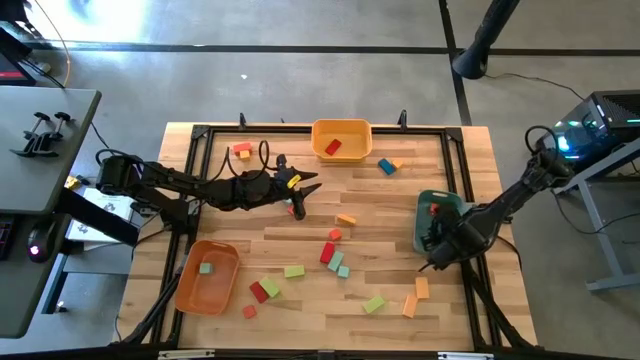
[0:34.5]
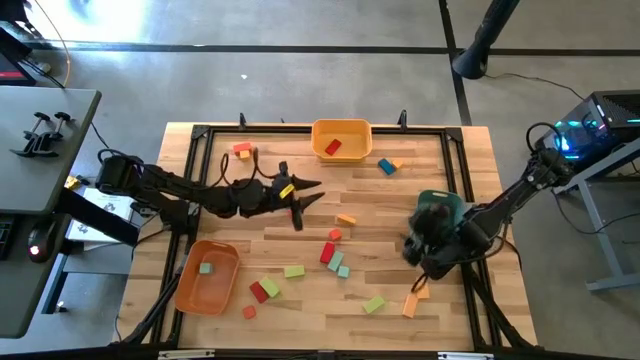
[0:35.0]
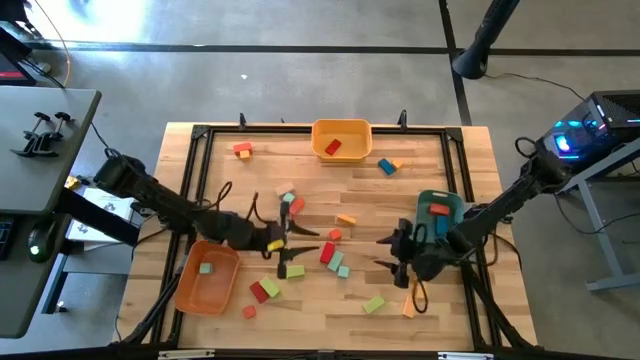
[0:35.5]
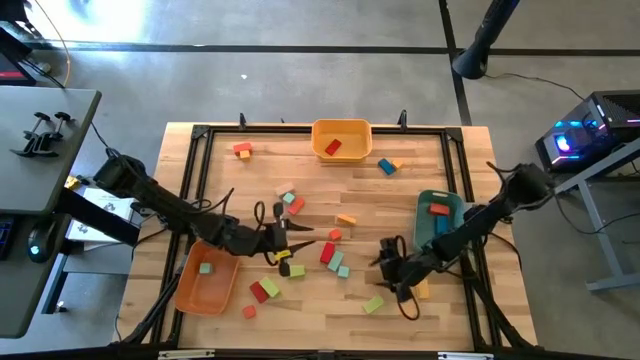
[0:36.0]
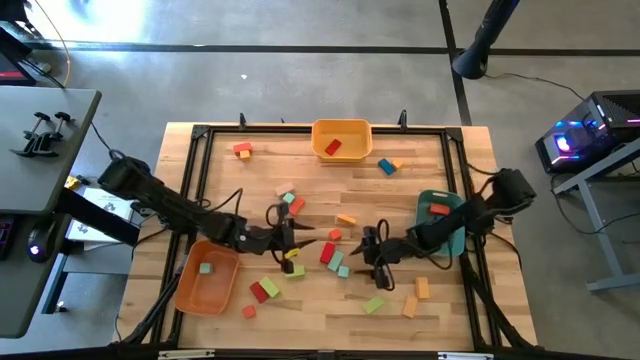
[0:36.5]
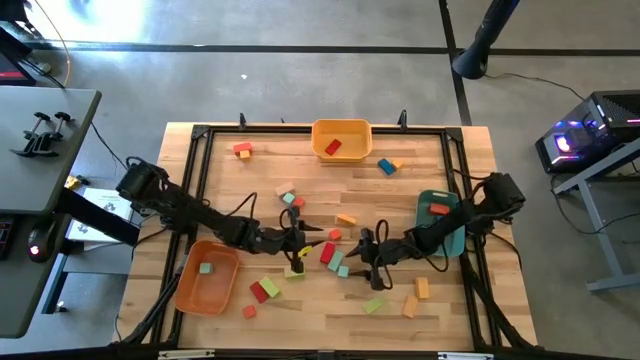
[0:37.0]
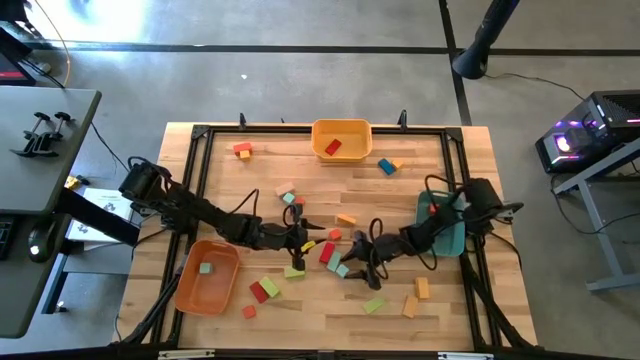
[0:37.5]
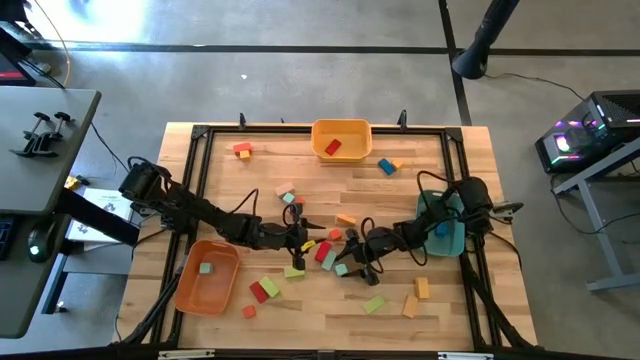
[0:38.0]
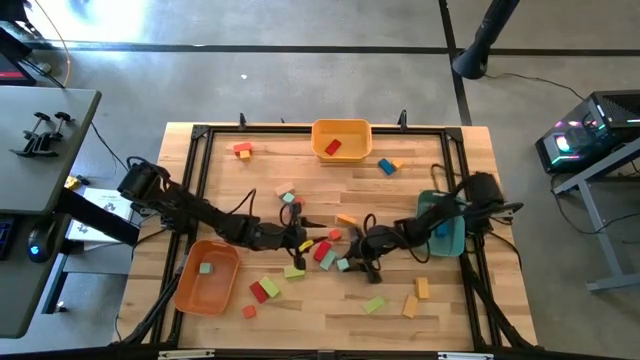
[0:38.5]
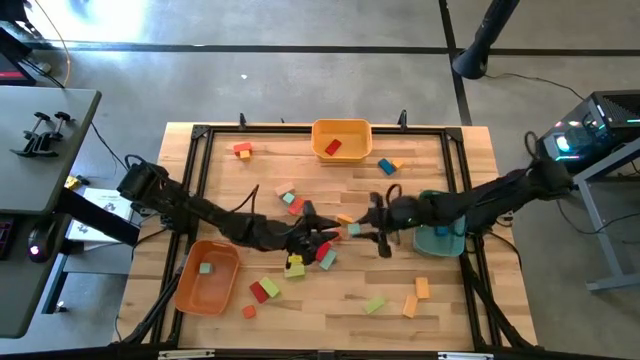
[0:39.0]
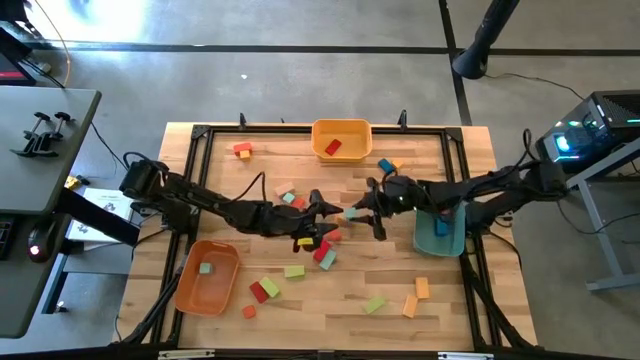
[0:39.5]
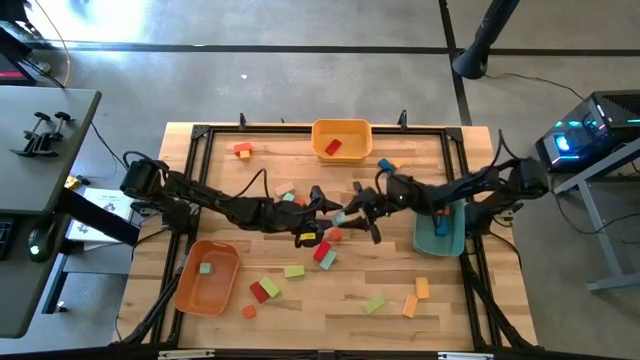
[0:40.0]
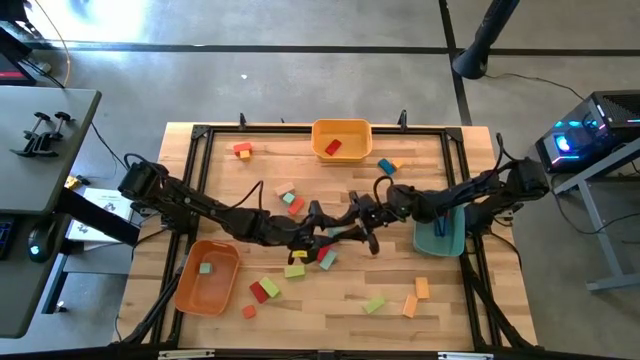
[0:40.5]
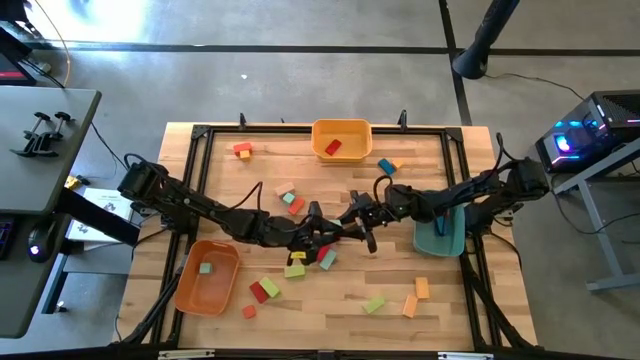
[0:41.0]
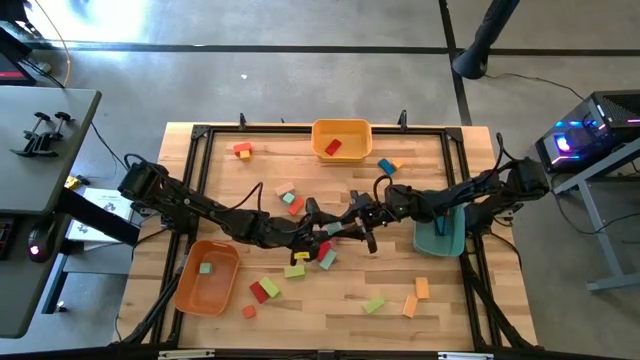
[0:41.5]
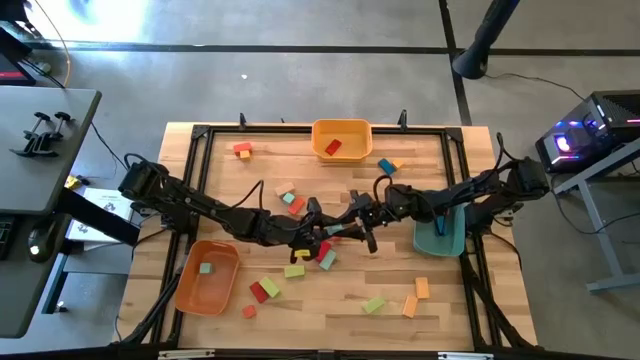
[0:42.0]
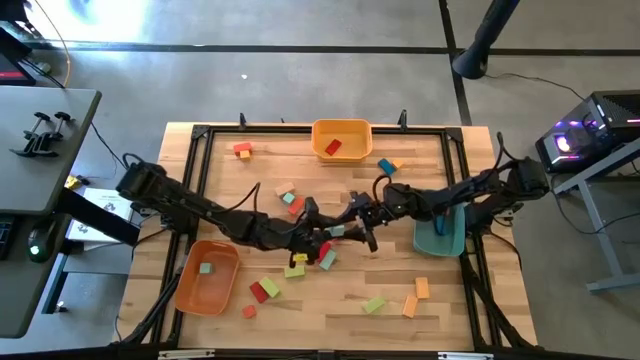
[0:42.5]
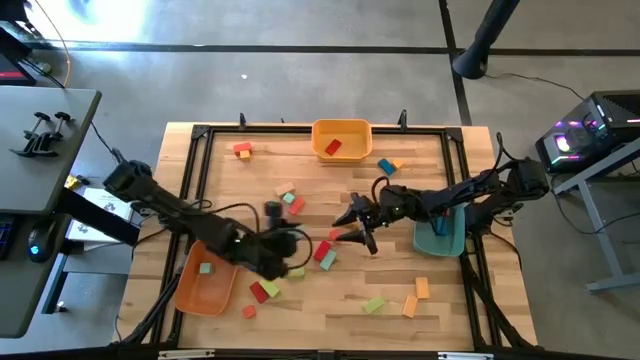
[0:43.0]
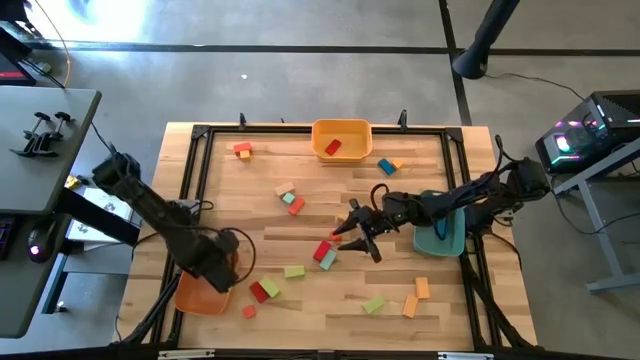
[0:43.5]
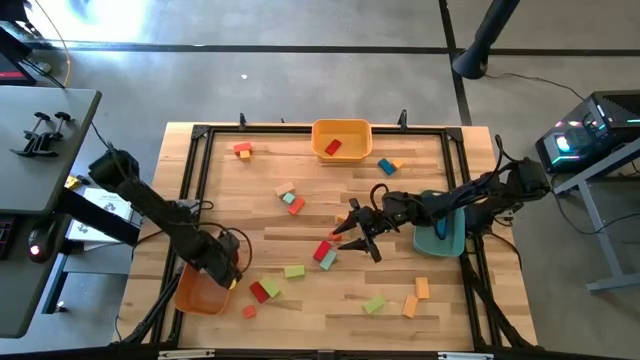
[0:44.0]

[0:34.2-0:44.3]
Task: Sort blocks by size
Put the light blue square block into the orange bin

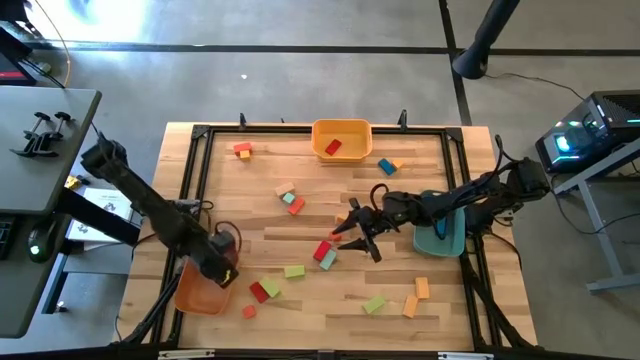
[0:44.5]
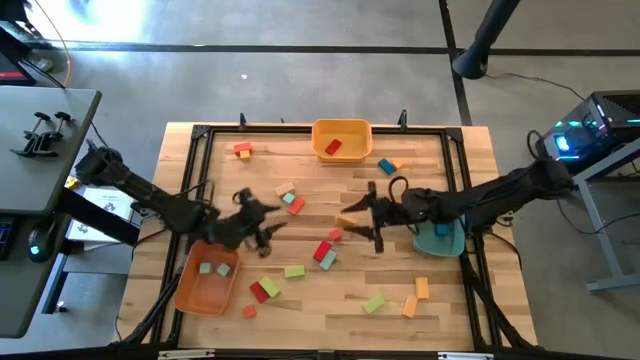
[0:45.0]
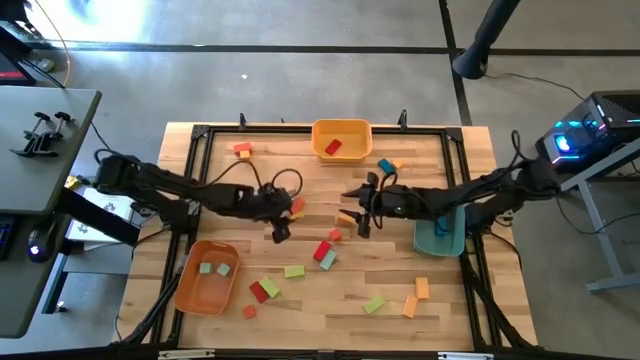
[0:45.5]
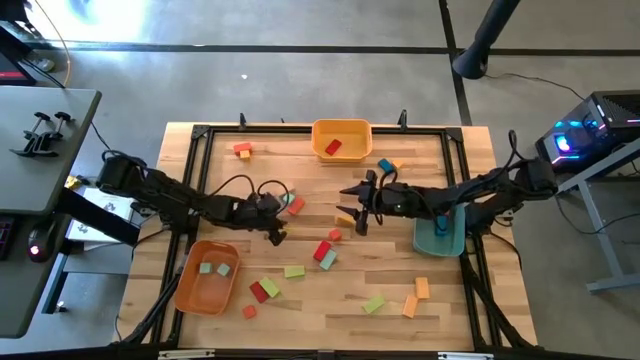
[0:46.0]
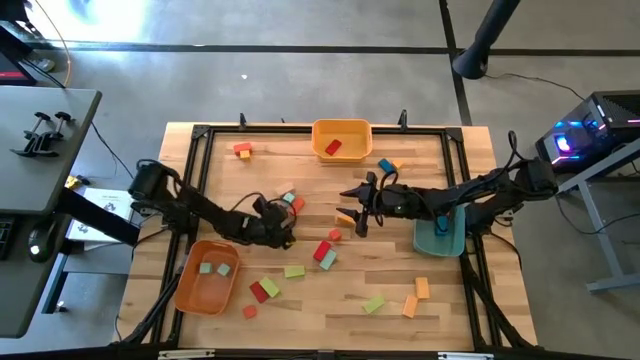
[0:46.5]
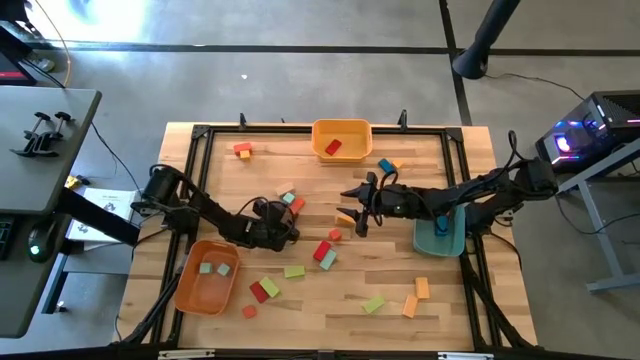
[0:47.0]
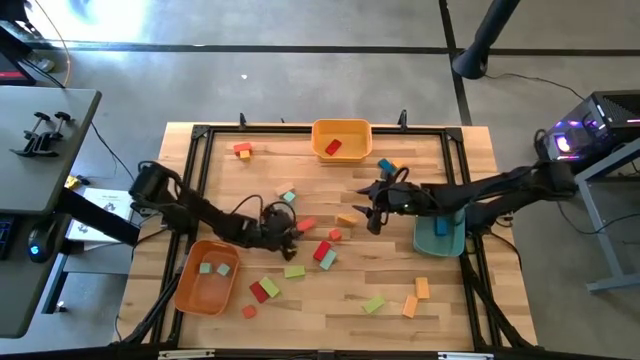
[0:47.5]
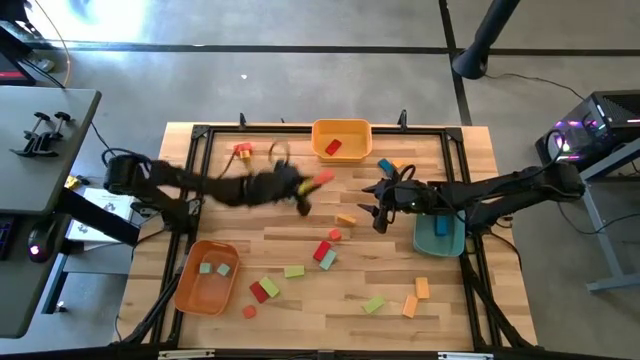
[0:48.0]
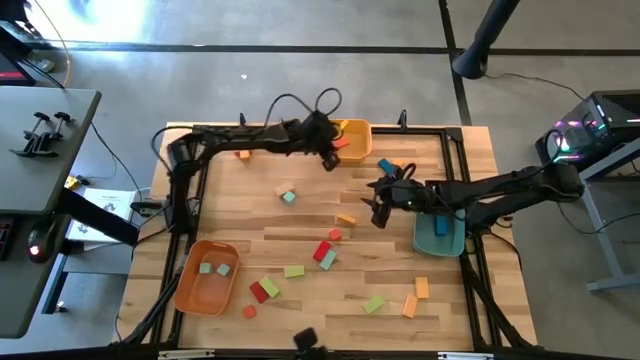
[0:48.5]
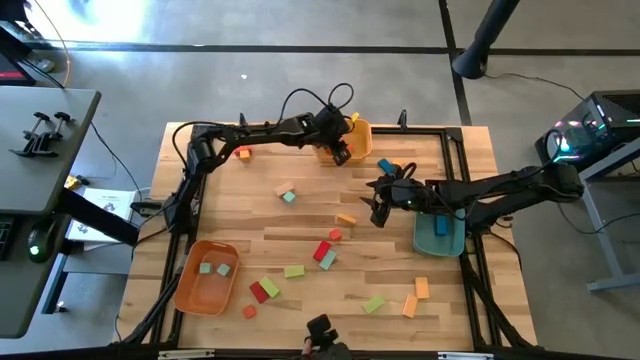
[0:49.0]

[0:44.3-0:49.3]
Put the orange thin rectangular block into the yellow bin

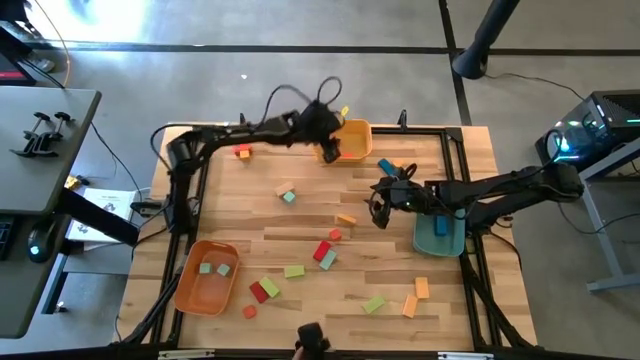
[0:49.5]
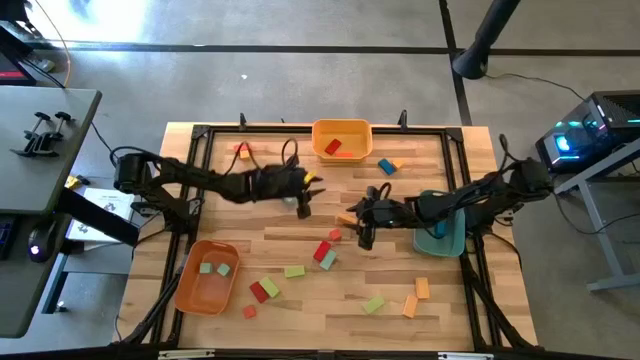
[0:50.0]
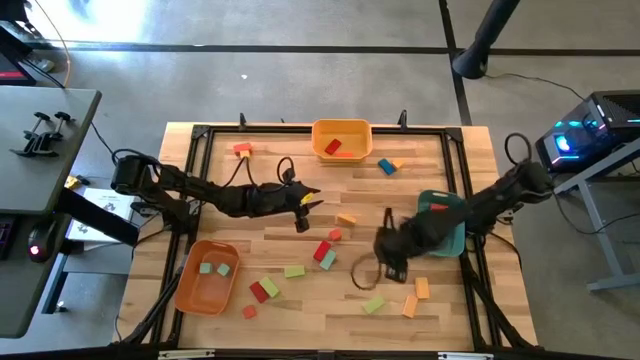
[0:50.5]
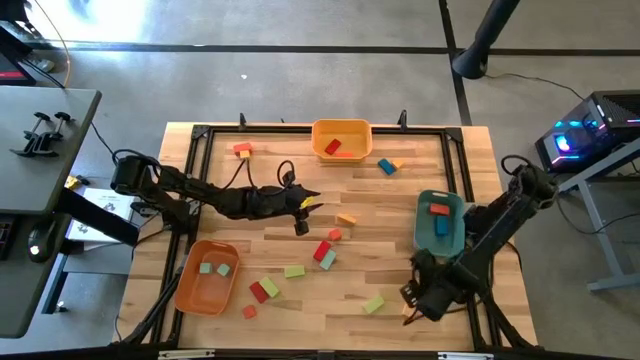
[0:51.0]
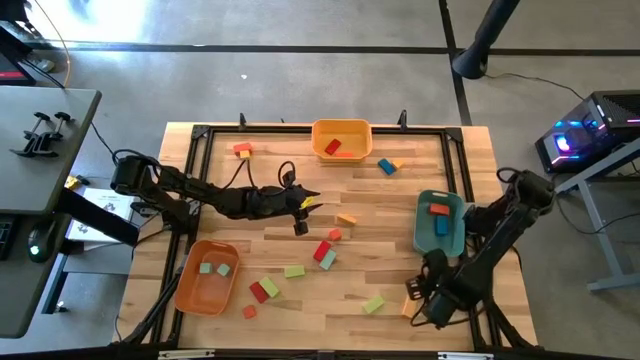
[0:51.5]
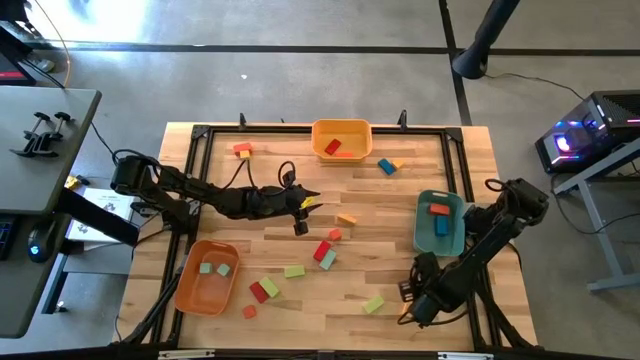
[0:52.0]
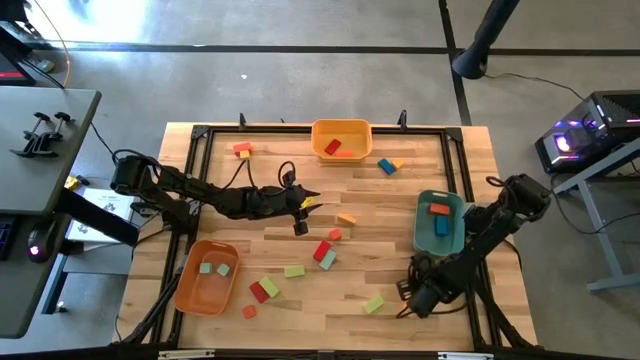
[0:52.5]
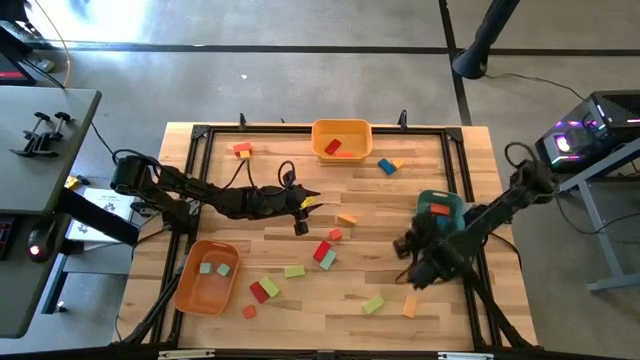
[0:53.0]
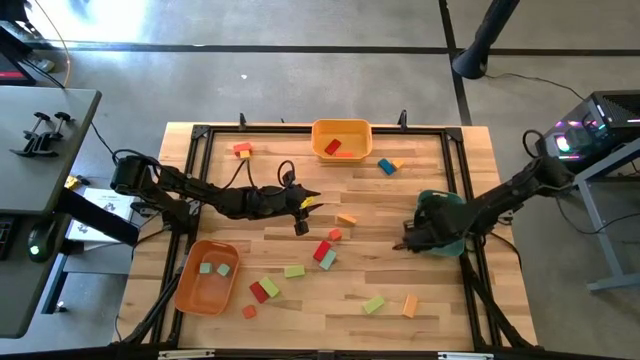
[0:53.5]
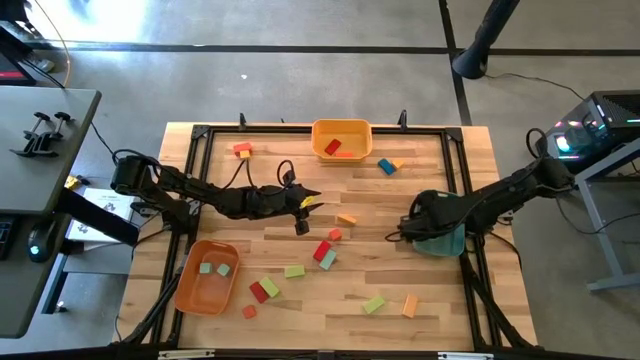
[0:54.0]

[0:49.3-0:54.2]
Put the yellow thick rectangular block into the blue bin

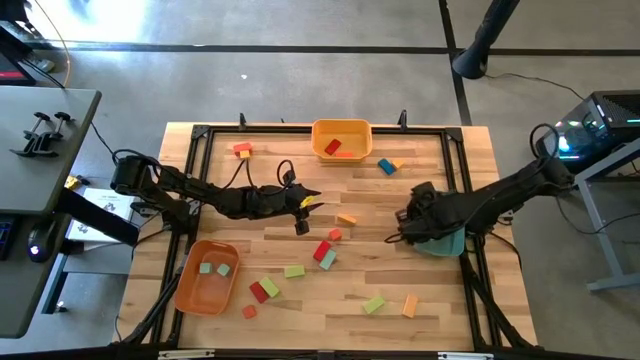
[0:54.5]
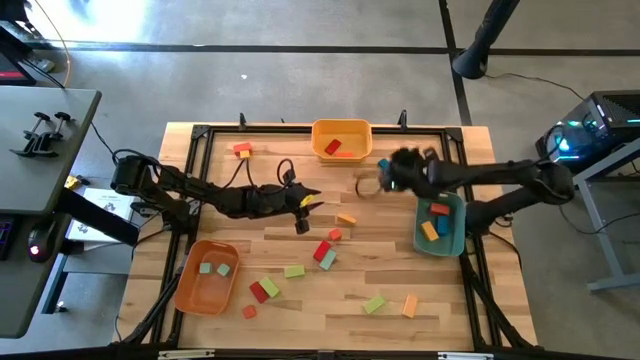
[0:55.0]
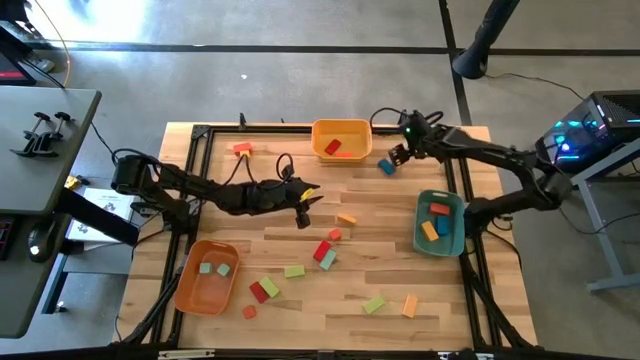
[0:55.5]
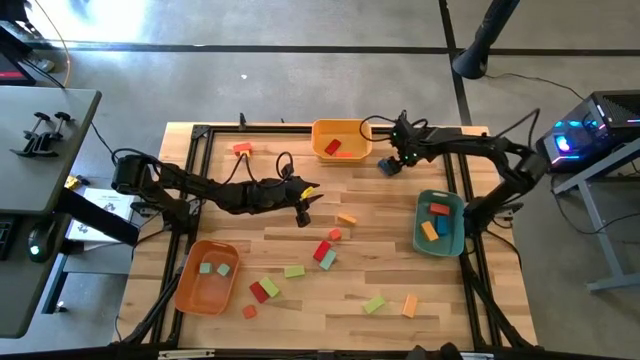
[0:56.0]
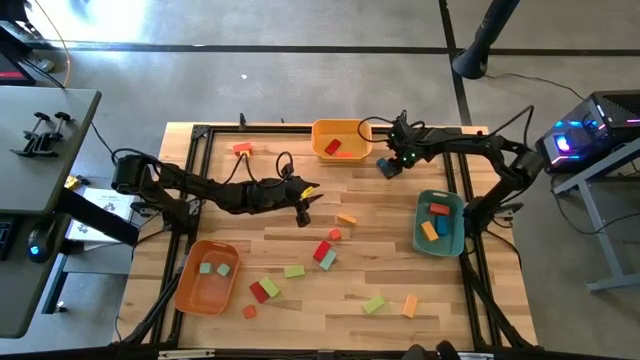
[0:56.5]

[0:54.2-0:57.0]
Put the yellow square block into the orange bin
